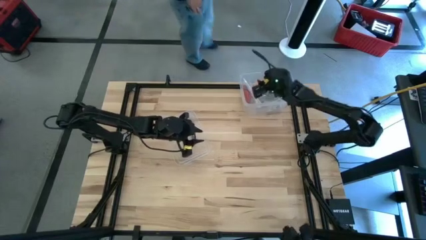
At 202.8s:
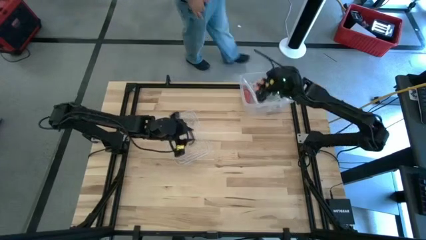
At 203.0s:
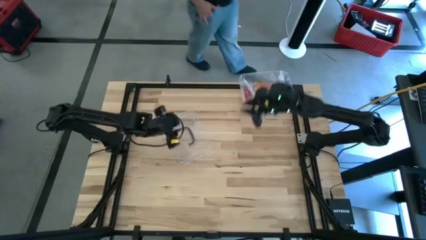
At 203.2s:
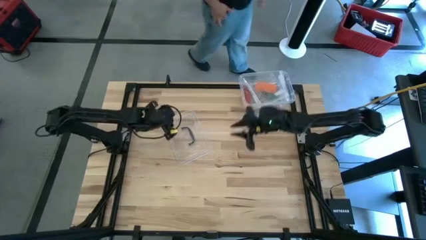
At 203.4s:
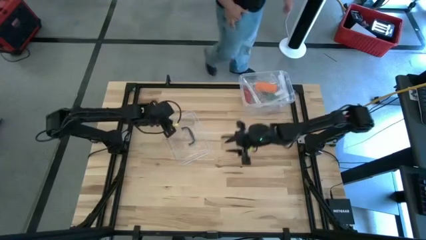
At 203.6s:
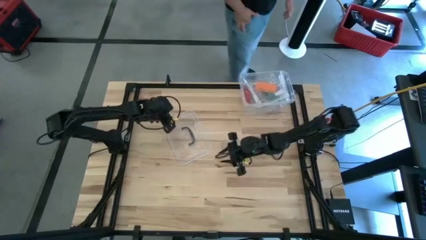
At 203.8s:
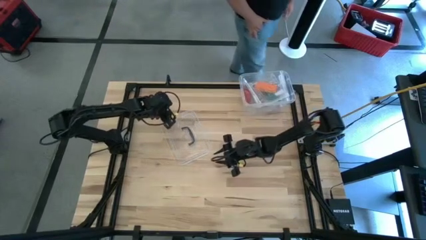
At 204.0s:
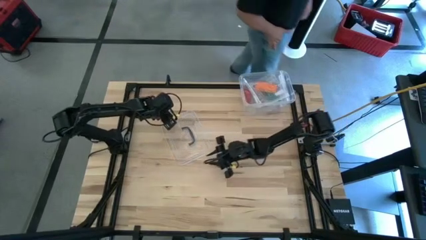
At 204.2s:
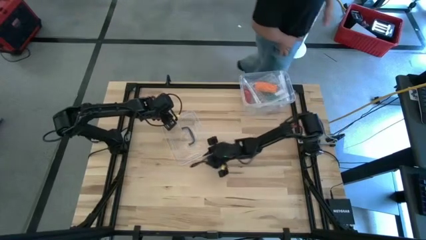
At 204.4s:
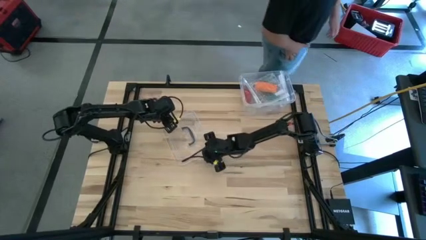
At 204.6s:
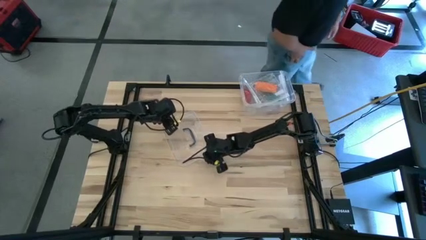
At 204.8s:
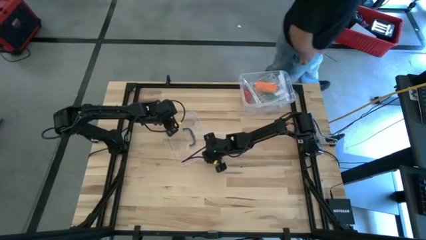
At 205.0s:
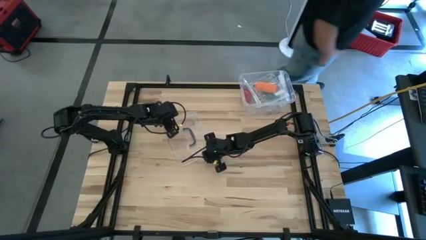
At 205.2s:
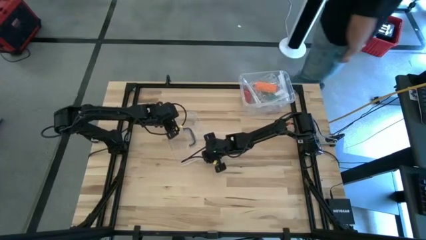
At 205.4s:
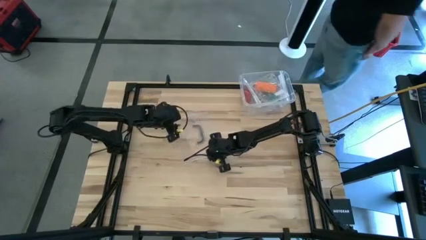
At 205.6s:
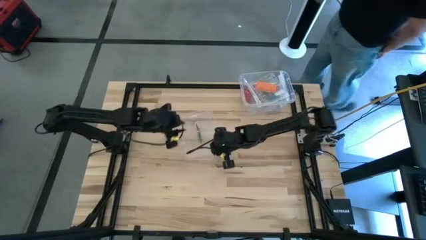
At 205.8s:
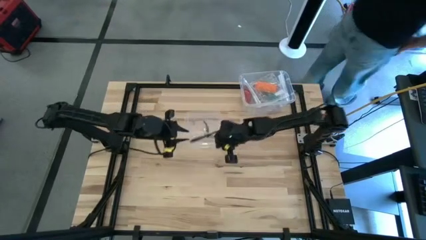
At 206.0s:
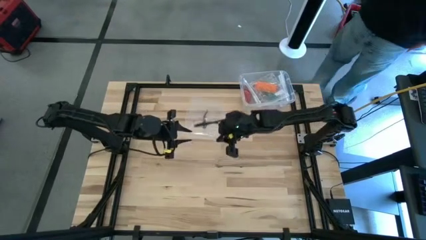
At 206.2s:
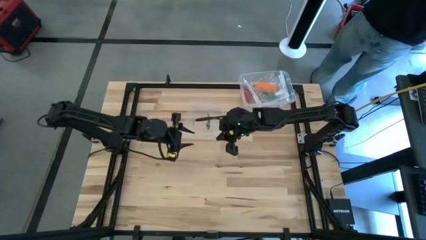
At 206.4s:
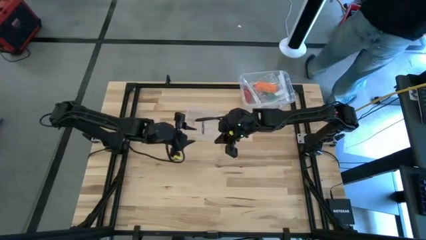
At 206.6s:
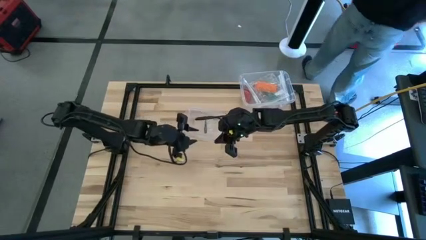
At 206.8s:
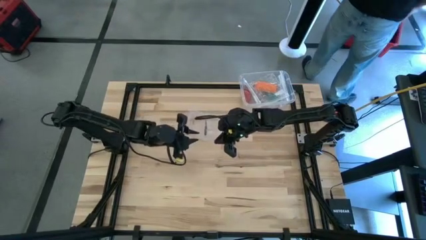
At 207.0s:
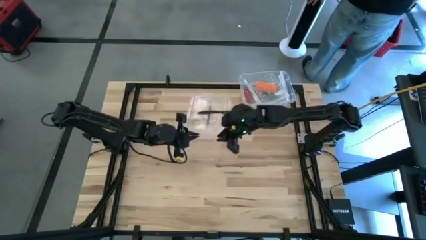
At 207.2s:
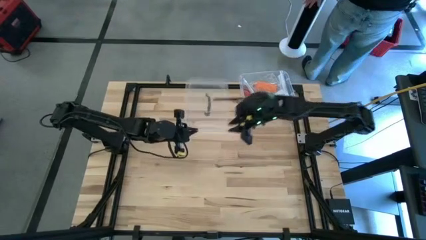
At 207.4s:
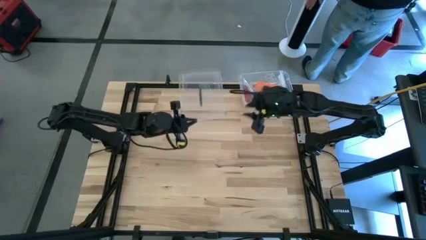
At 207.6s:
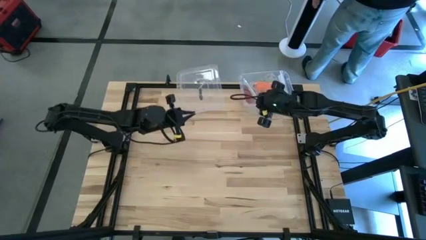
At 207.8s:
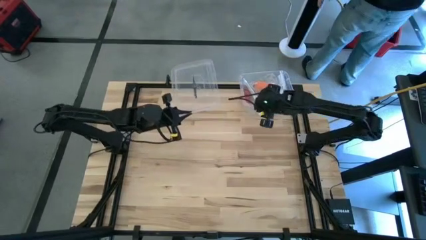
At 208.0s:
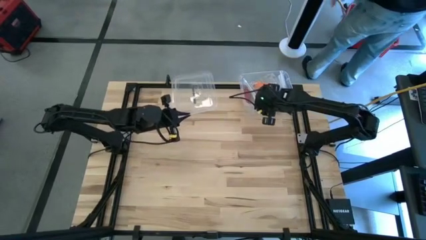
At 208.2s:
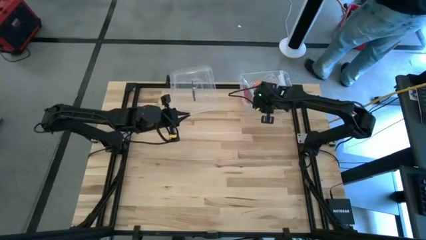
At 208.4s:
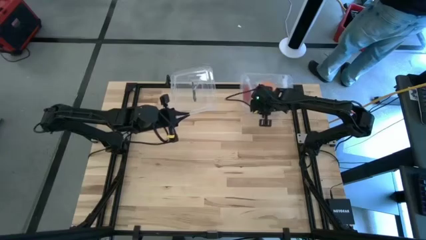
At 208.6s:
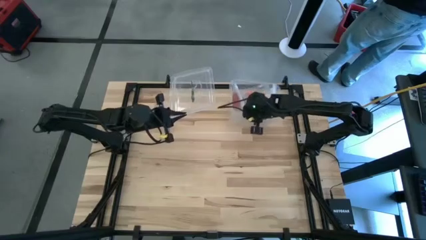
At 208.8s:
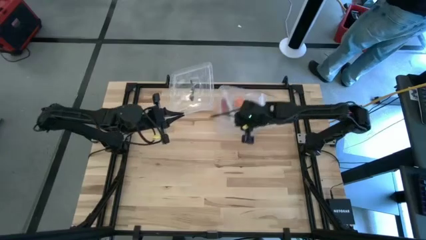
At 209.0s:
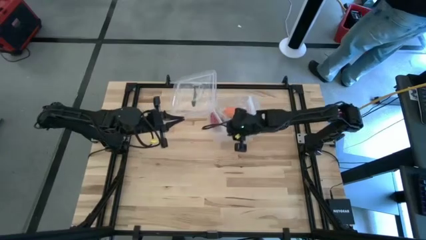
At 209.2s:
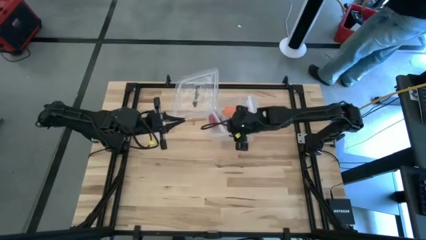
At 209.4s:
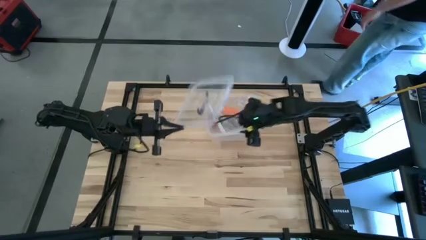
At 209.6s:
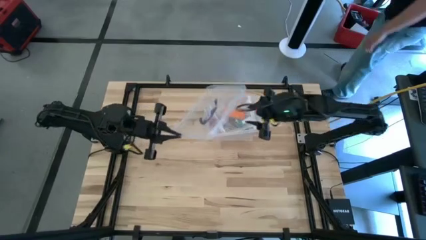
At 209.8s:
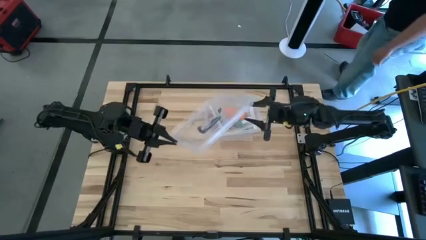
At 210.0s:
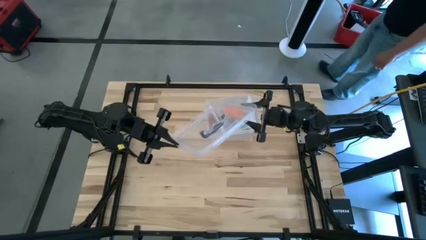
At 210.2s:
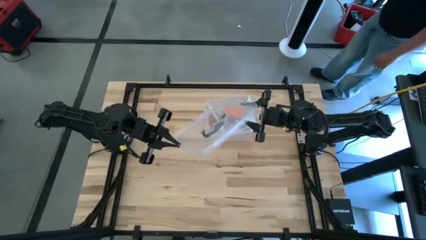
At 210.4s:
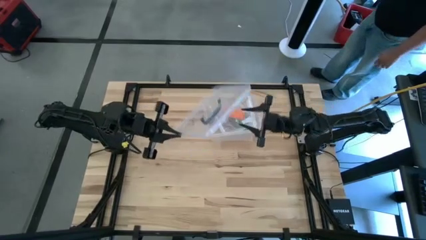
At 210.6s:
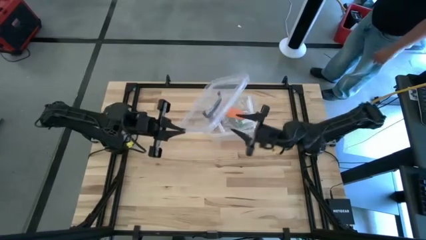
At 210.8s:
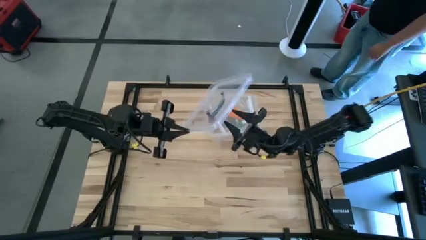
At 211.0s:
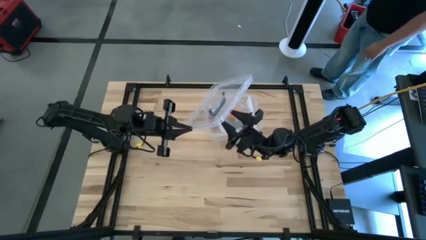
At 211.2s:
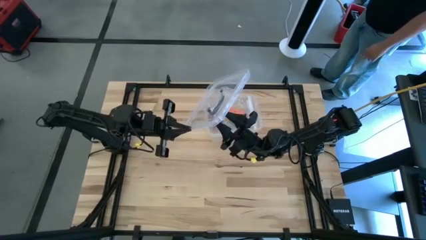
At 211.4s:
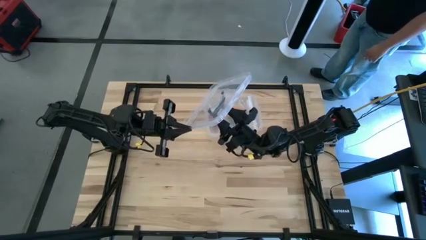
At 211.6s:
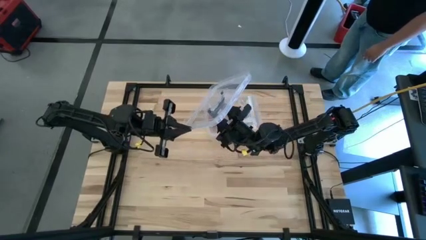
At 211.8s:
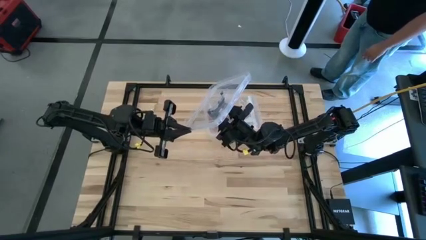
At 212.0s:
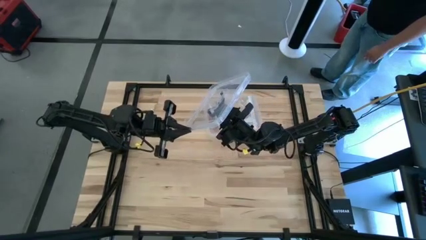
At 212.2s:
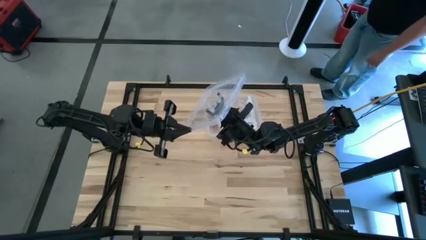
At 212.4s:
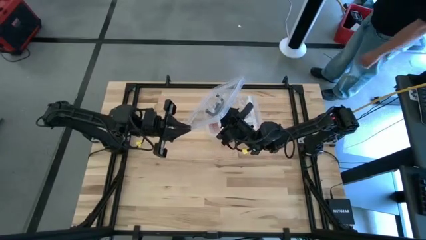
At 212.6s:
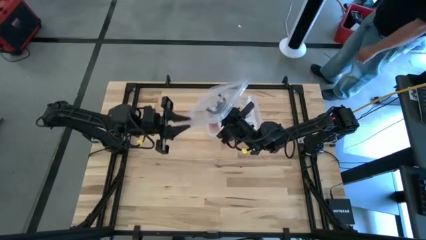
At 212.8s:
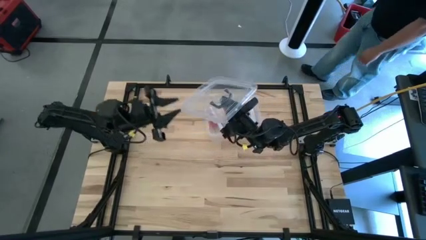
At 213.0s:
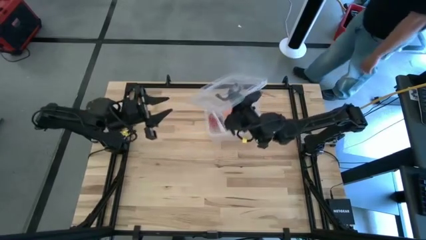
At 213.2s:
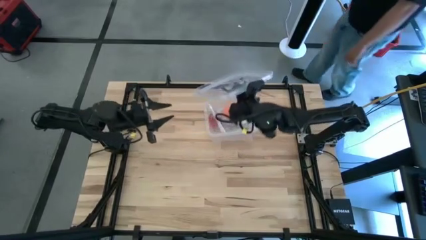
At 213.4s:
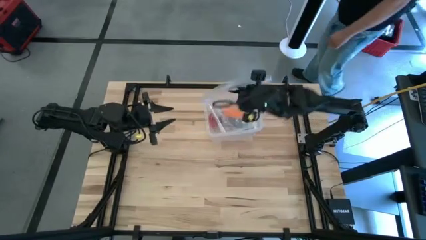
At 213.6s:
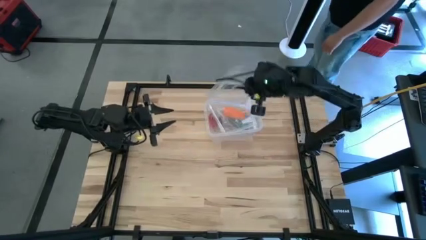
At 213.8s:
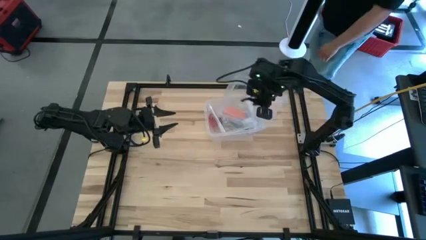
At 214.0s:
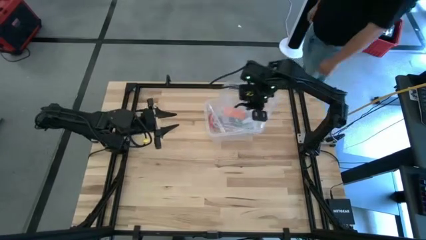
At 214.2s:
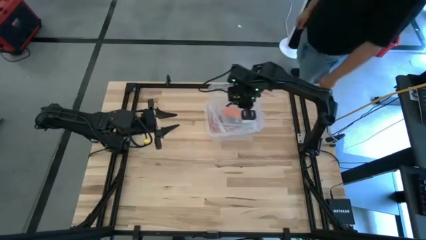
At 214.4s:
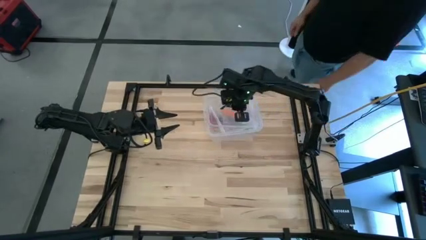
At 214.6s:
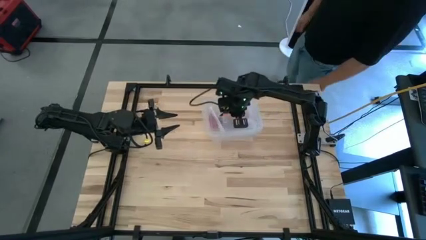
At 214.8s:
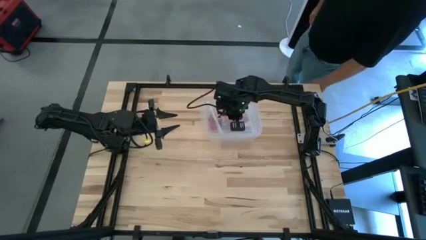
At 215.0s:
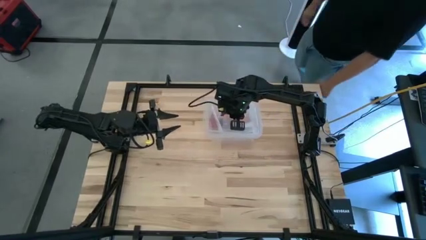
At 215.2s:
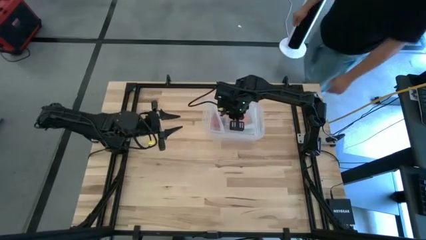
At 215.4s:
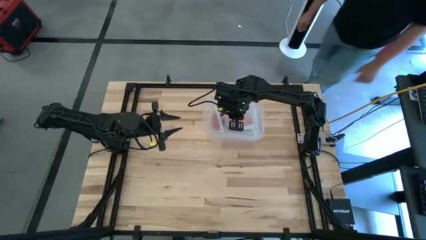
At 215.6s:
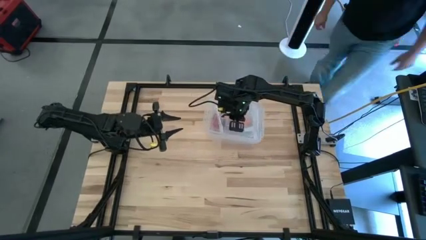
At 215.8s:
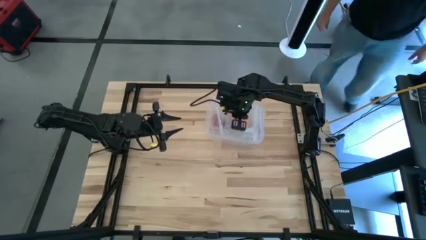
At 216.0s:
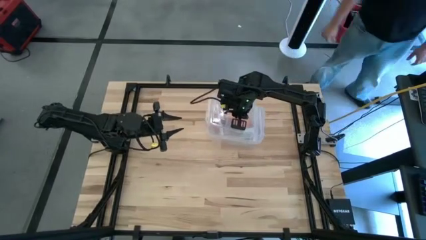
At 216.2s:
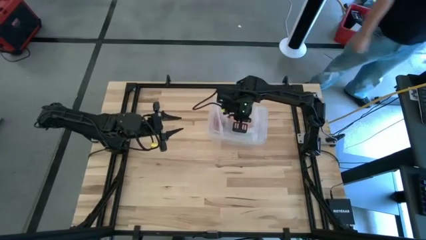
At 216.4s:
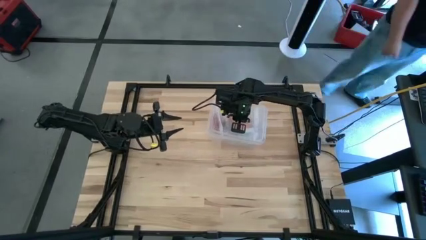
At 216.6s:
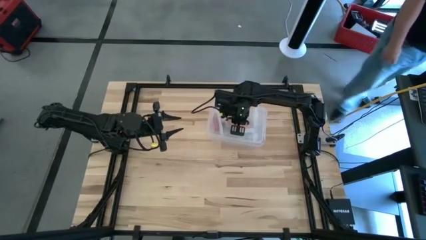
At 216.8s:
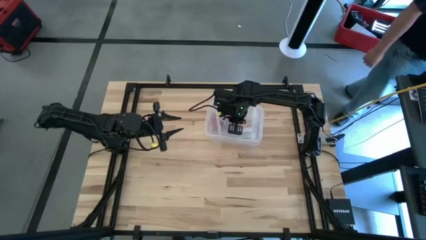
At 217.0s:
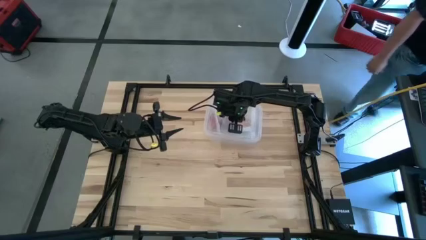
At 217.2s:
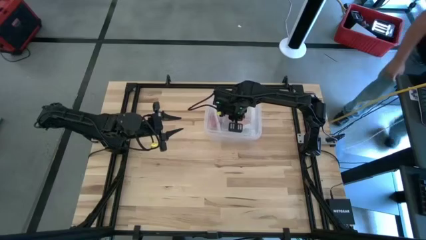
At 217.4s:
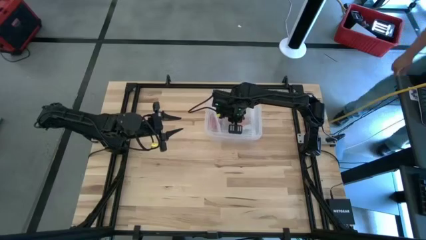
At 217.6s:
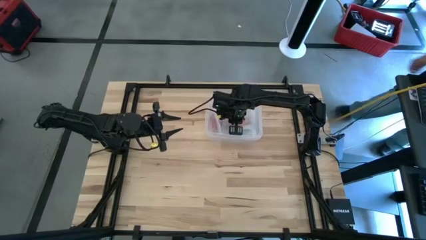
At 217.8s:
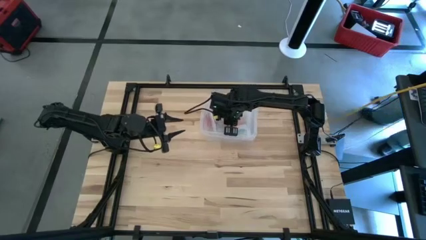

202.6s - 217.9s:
Task: Roll bandage
Close the transparent bin

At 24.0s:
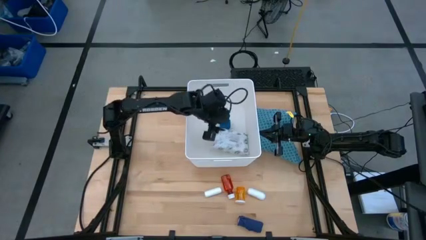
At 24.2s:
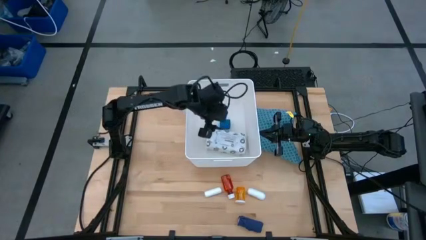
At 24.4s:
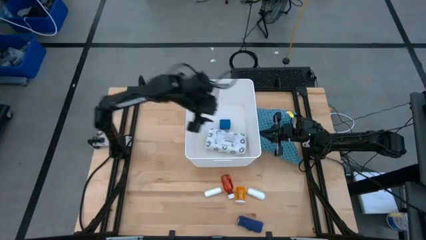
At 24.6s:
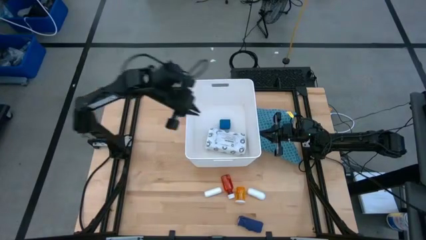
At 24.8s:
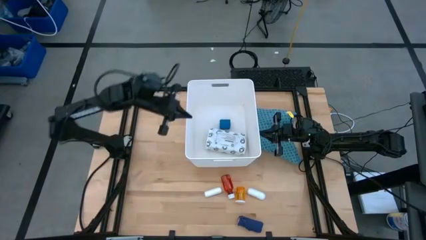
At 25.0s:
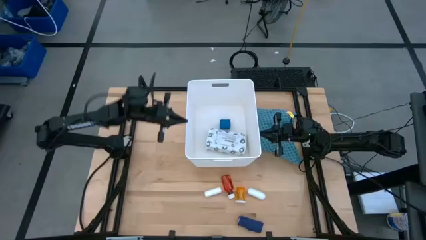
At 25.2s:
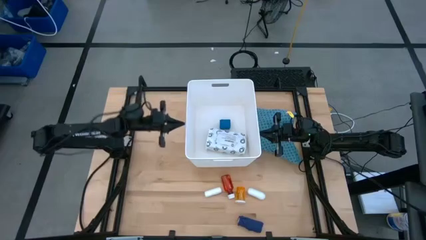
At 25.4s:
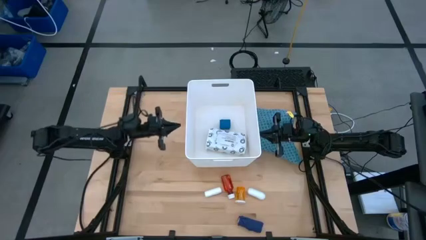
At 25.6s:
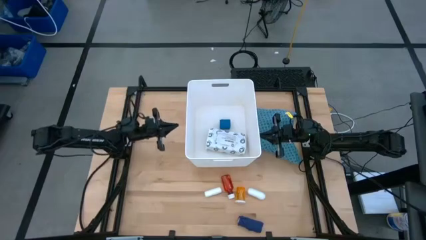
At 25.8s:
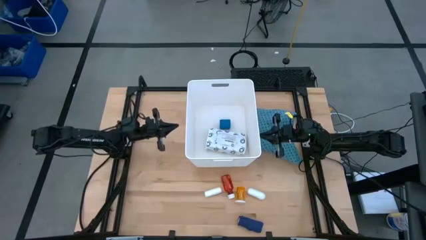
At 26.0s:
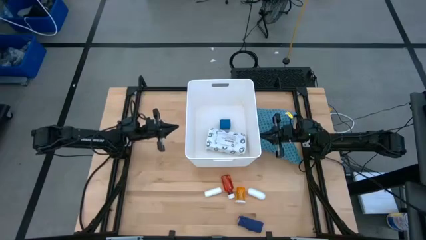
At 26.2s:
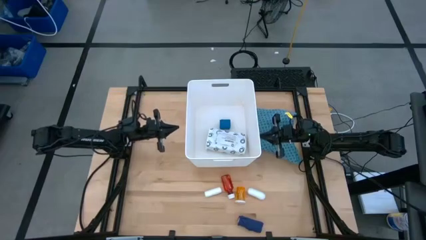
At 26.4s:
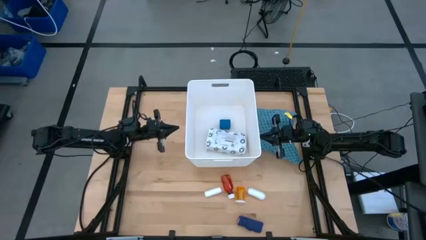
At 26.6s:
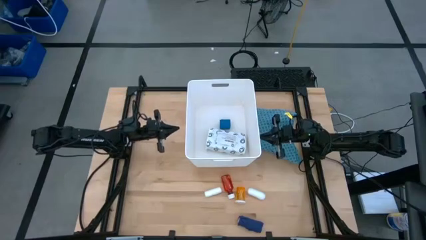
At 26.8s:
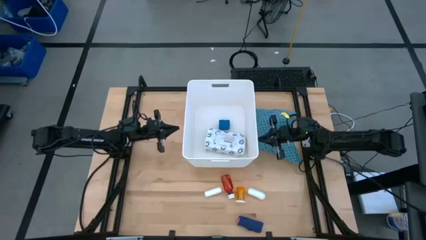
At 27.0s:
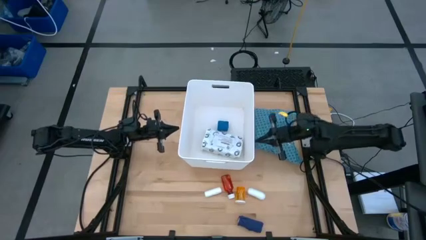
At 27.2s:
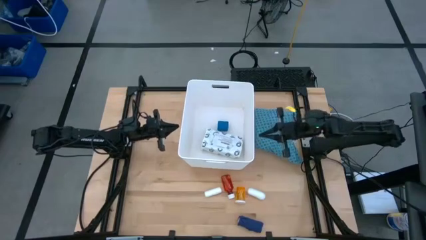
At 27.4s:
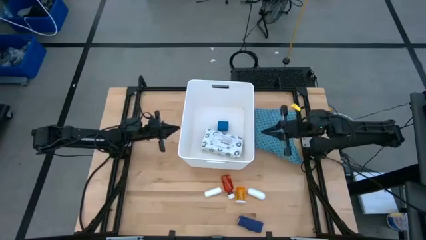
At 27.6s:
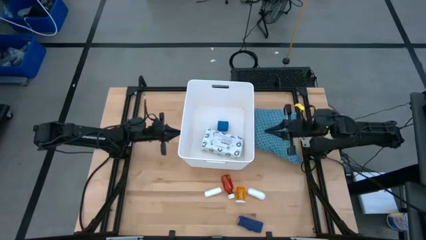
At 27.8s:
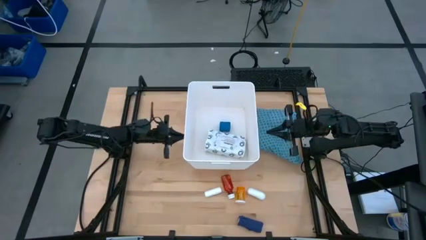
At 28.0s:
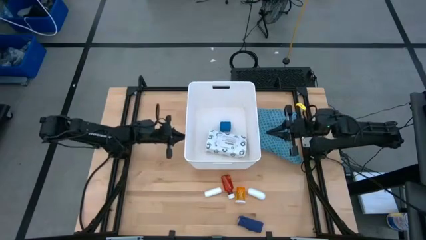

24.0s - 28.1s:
Task: Pick & place medical supplies in basket/bin
Adjust the white bin
